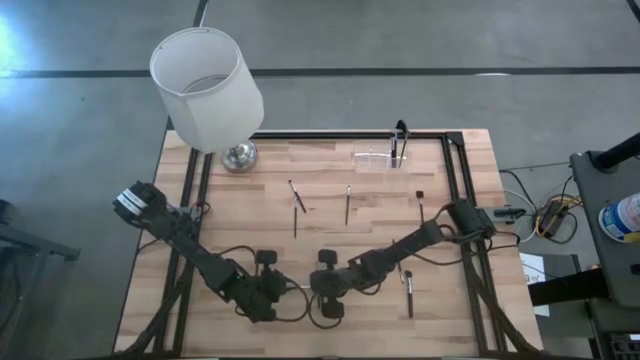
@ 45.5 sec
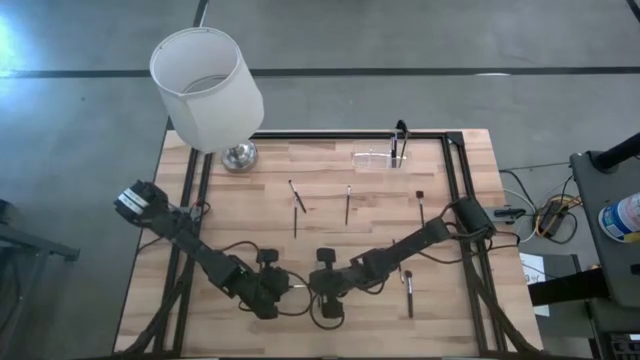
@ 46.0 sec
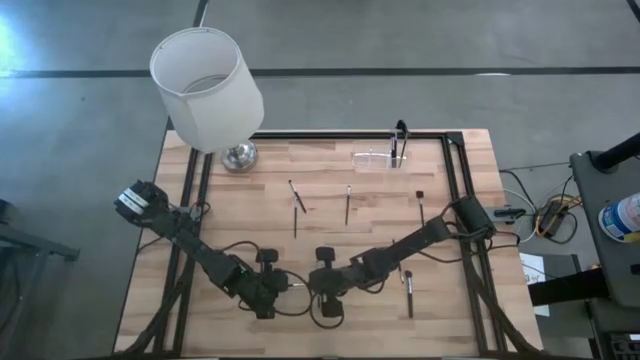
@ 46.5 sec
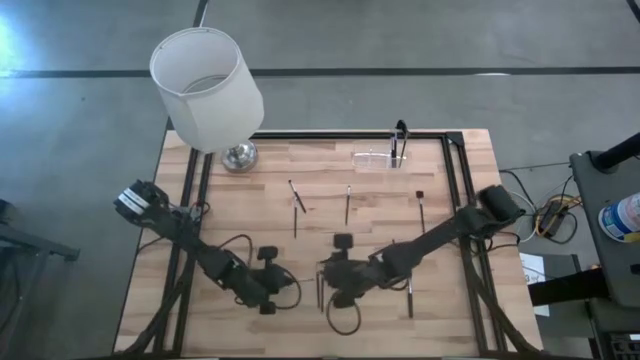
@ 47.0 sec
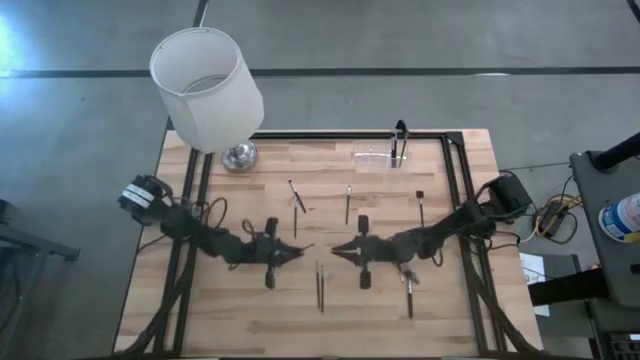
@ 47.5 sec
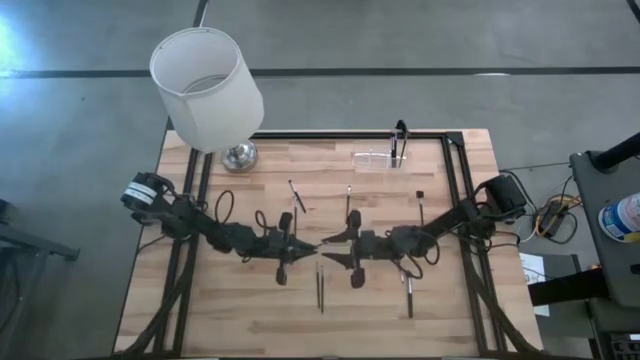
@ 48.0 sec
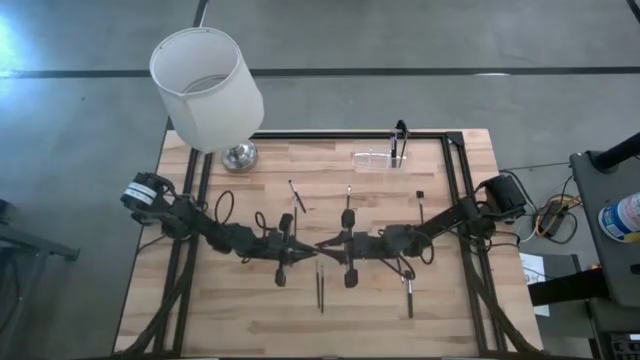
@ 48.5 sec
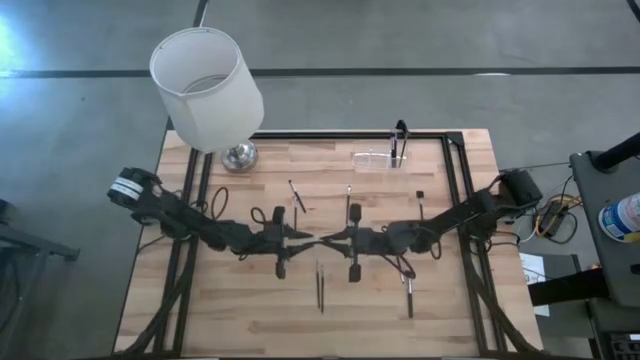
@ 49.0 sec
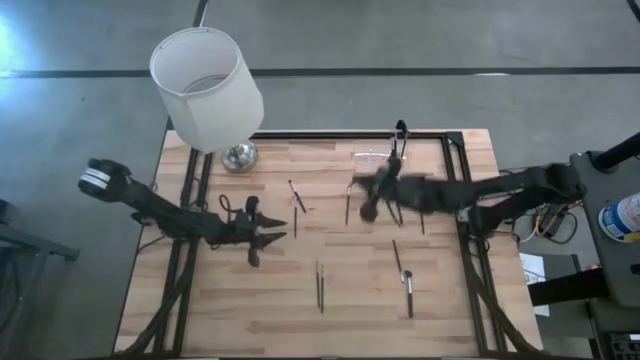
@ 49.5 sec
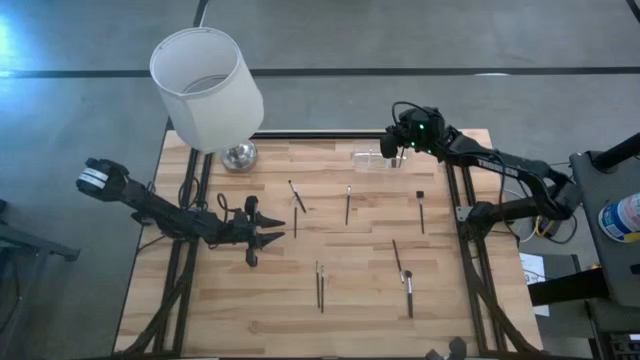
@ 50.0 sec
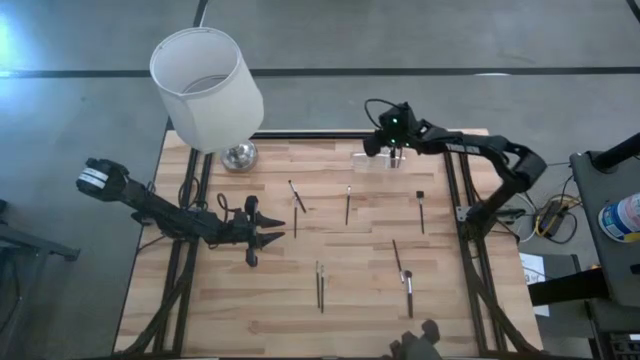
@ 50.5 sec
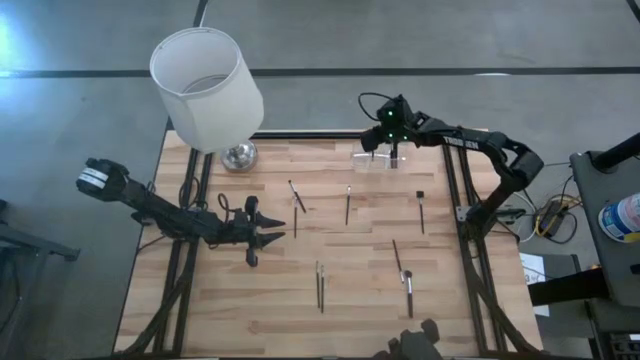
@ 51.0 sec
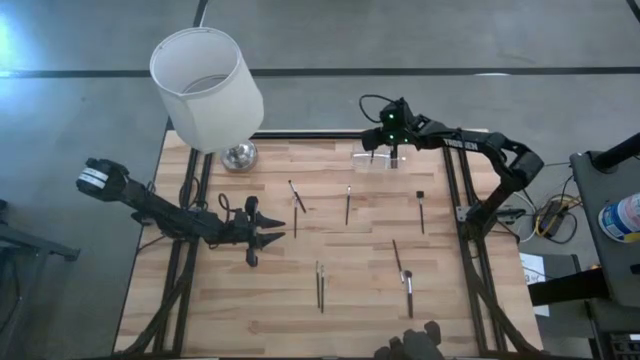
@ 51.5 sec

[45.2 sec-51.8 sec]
Task: Put items in baskets/containers
Put the foundation brush into the transparent organizer

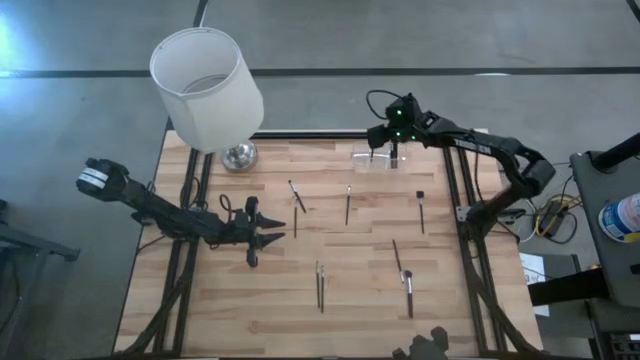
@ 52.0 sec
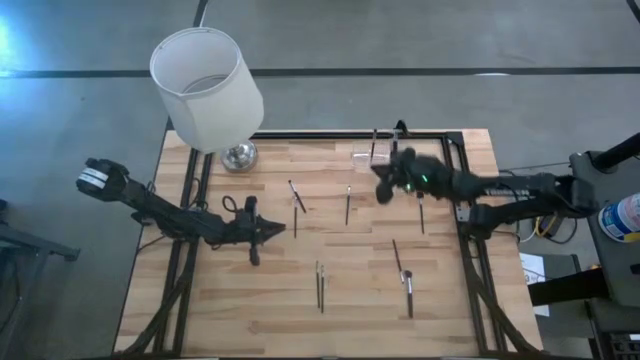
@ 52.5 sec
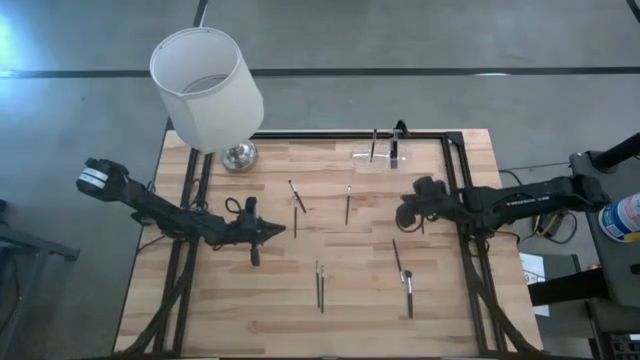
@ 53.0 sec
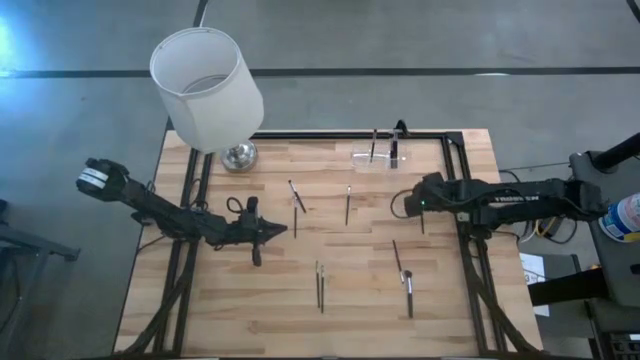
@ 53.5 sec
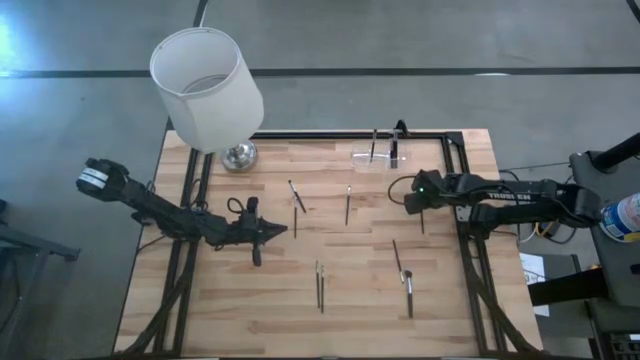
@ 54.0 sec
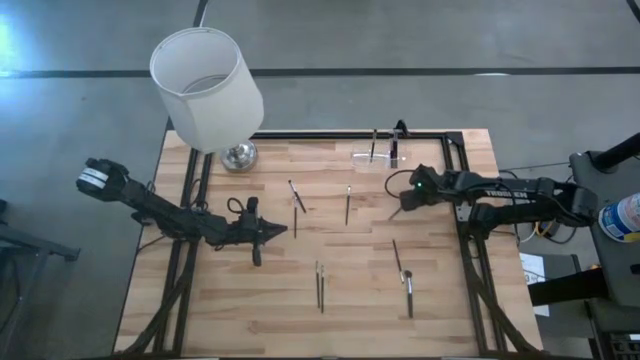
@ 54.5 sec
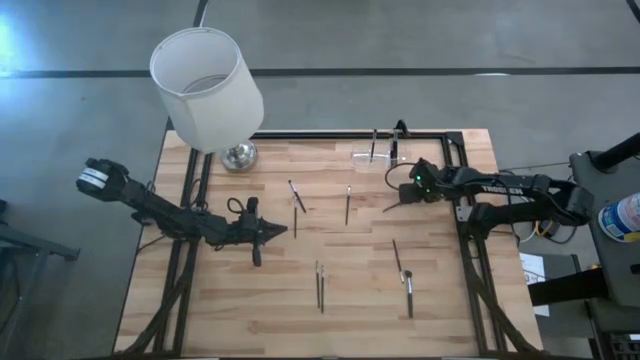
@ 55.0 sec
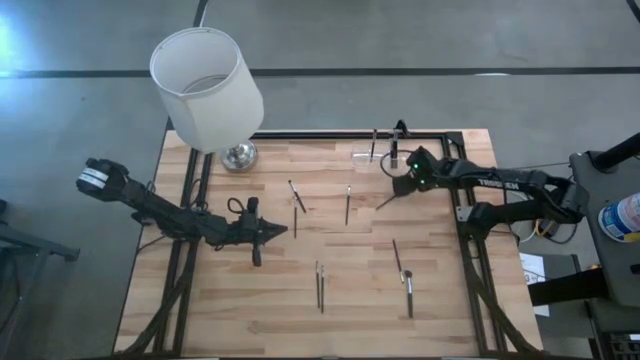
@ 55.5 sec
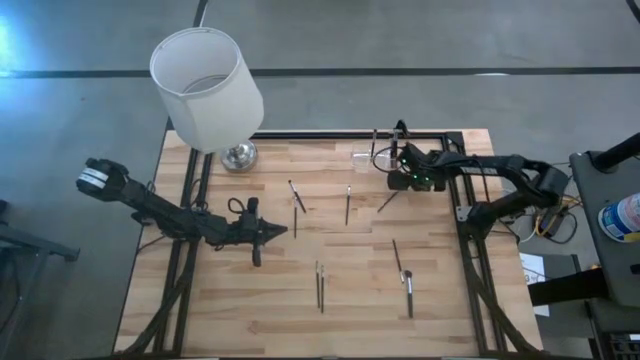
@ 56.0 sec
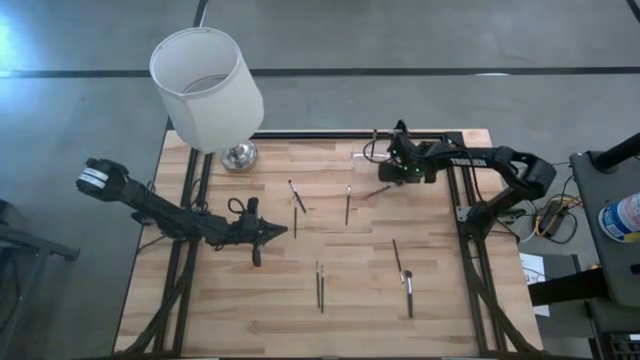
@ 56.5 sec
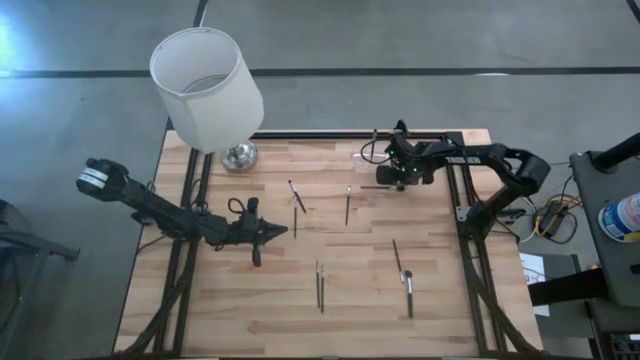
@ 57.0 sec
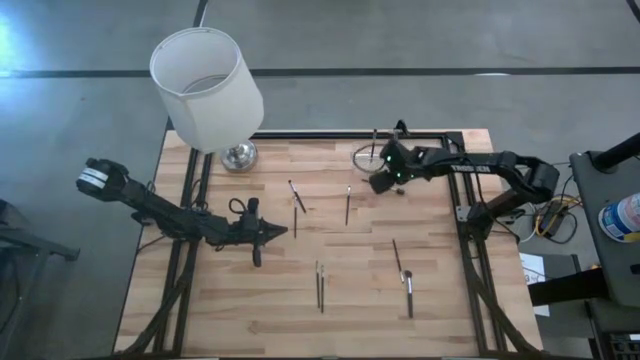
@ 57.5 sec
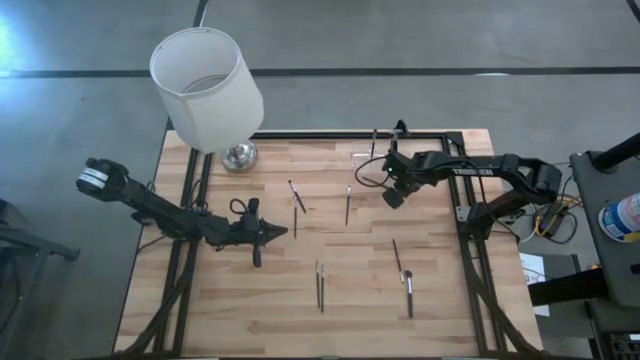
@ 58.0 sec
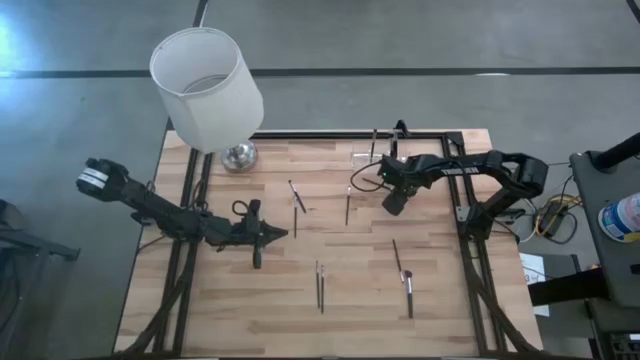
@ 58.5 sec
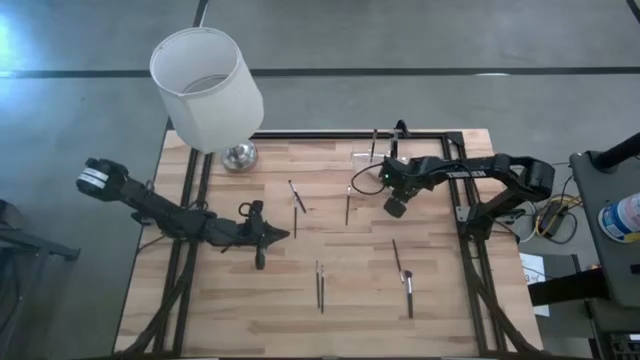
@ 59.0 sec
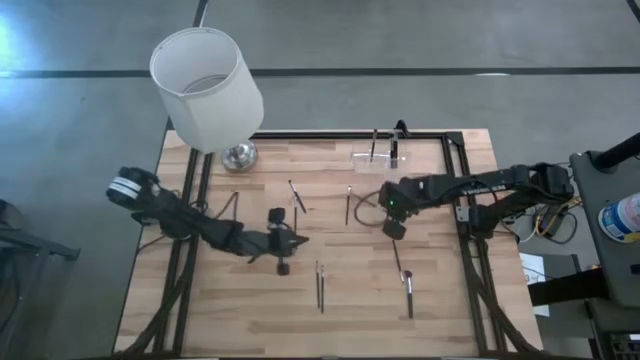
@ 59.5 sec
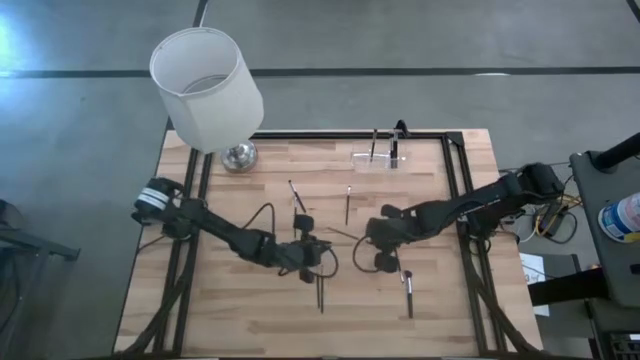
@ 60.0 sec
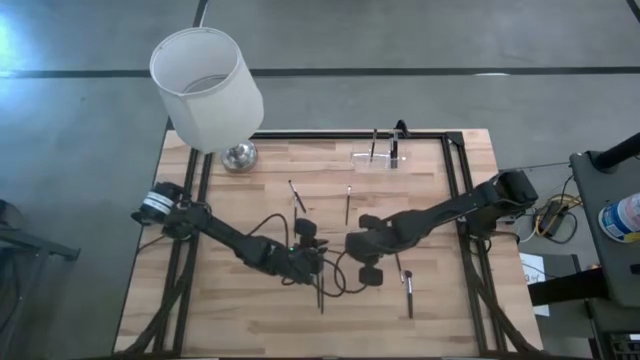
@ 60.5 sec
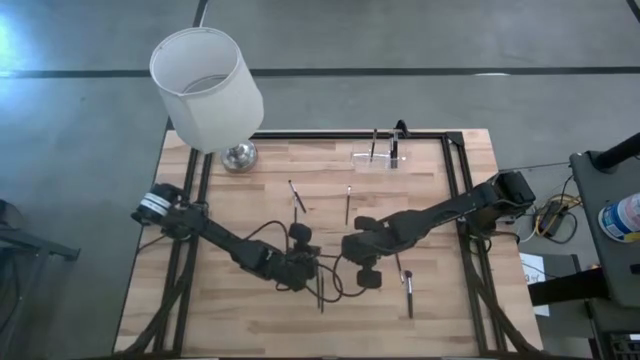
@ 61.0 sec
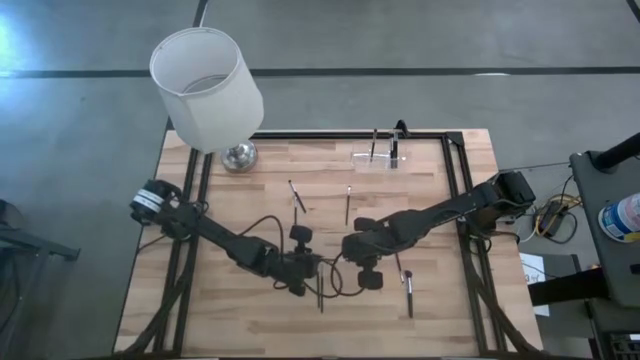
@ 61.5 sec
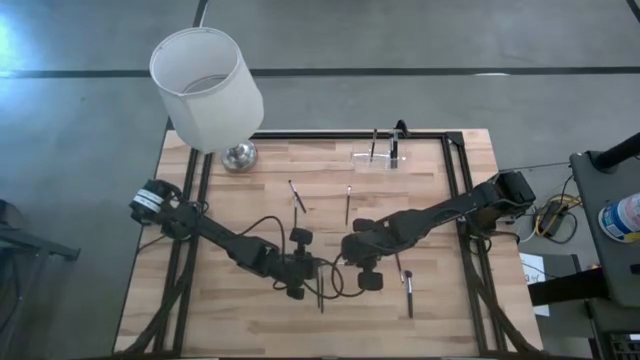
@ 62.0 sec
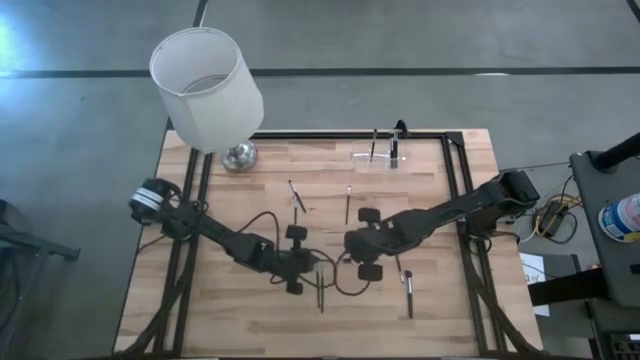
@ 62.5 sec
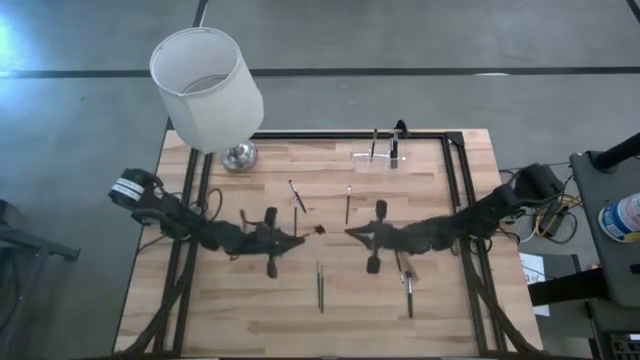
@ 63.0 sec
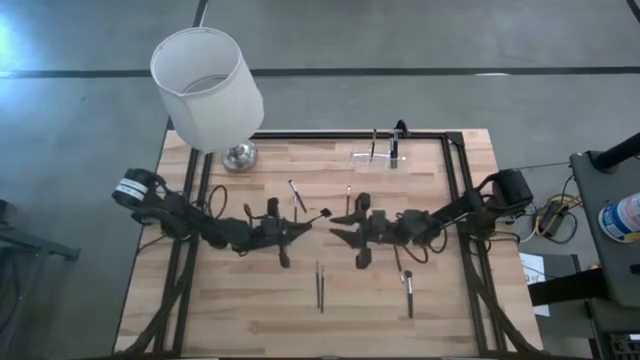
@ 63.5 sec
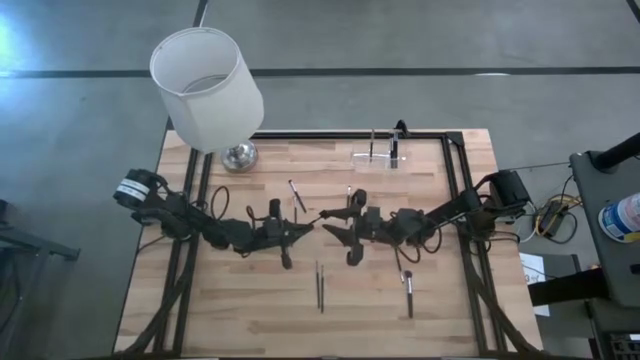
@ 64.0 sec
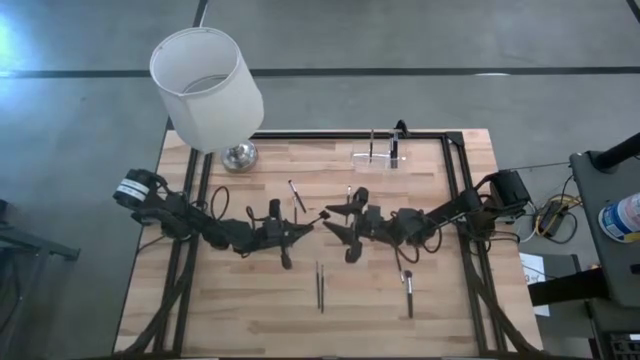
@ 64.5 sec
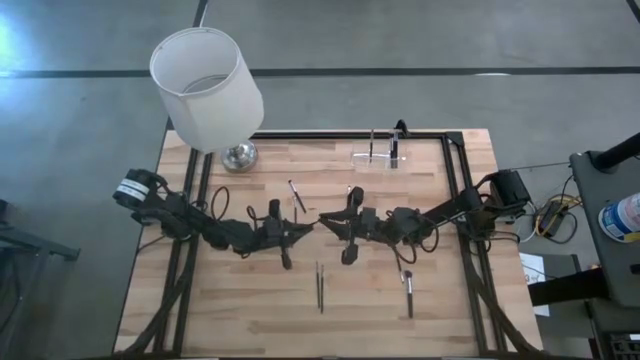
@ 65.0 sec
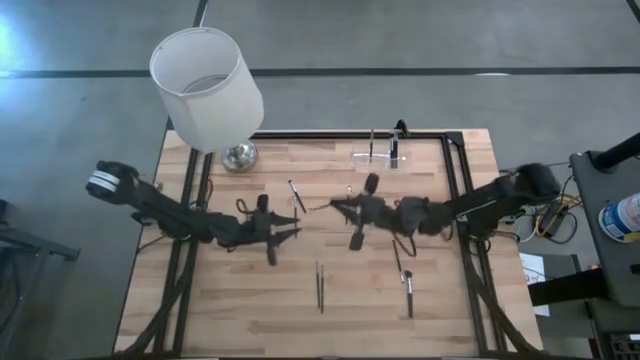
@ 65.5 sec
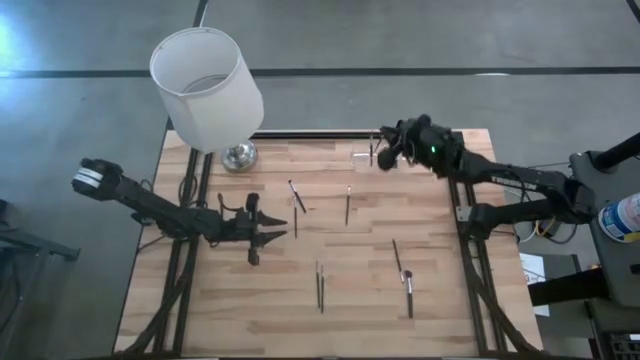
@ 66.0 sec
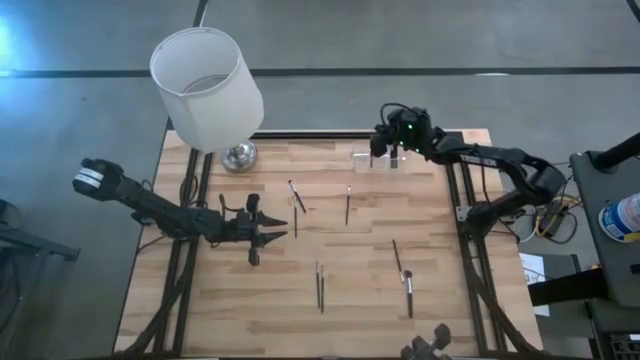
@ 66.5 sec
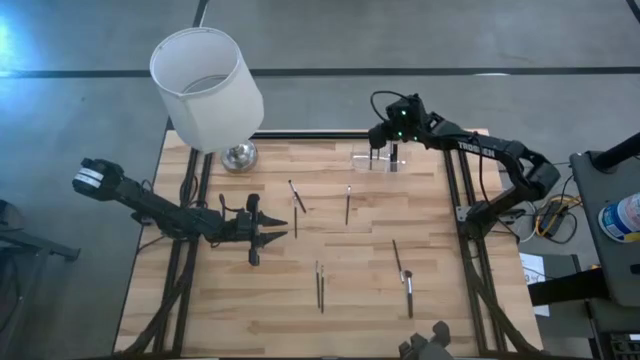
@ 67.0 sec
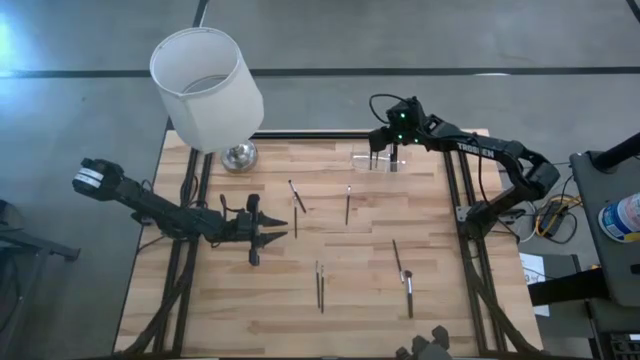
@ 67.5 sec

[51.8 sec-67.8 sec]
Put the lash brush into the transparent organizer

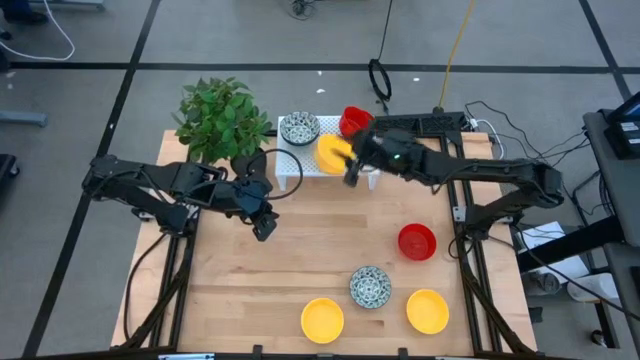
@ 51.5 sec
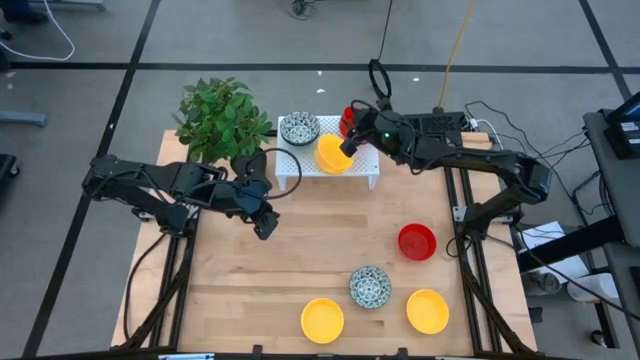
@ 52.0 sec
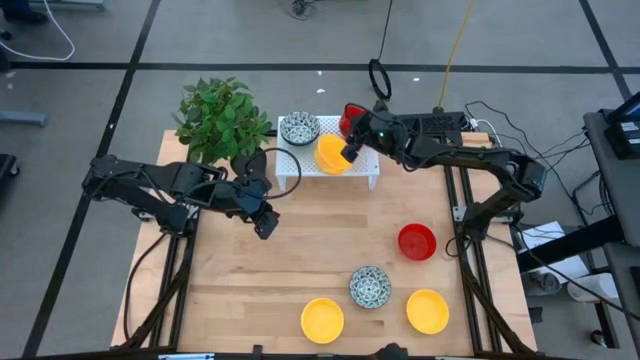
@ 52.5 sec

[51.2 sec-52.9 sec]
Task: Pick & Place Mini bowls
Adjust the red bowls on the shelf
